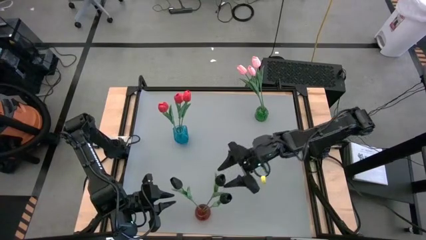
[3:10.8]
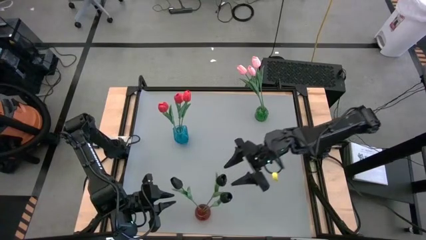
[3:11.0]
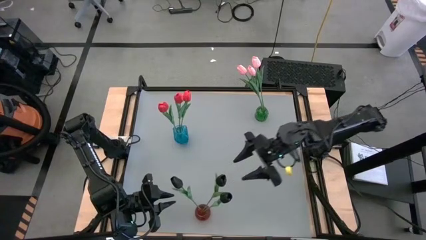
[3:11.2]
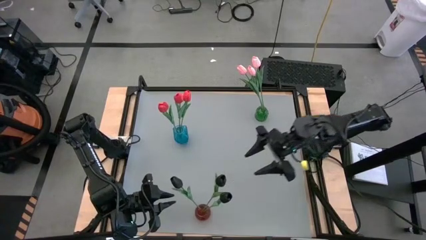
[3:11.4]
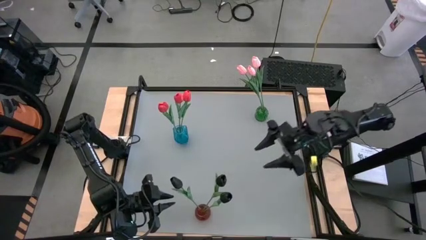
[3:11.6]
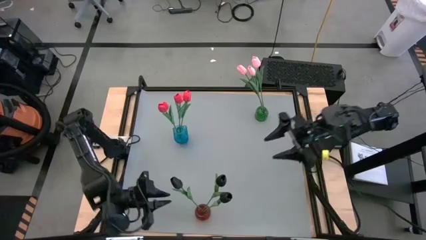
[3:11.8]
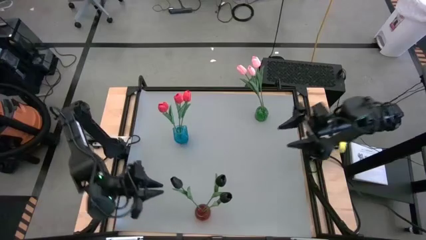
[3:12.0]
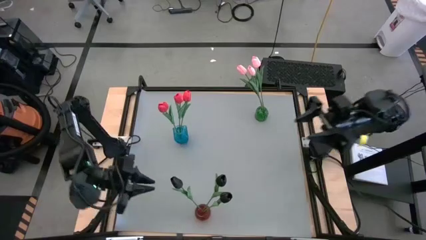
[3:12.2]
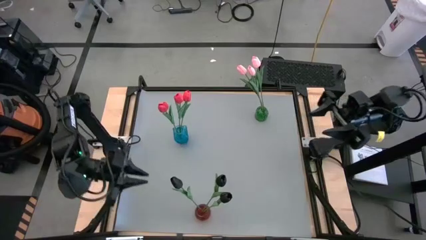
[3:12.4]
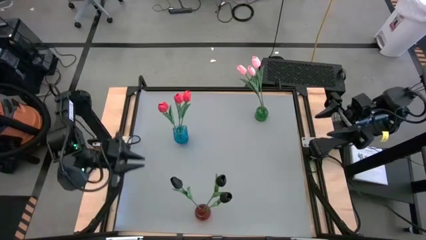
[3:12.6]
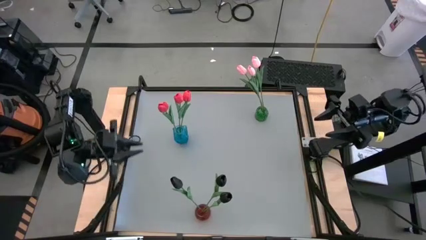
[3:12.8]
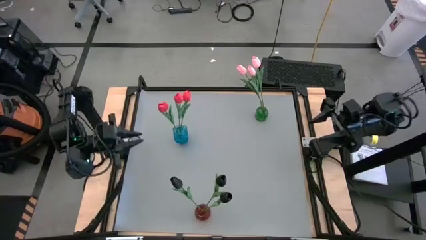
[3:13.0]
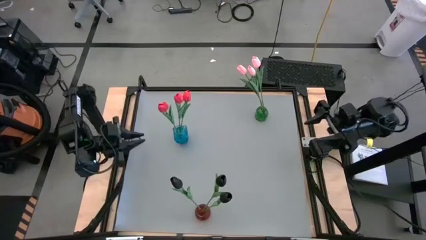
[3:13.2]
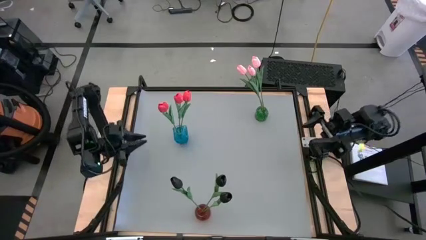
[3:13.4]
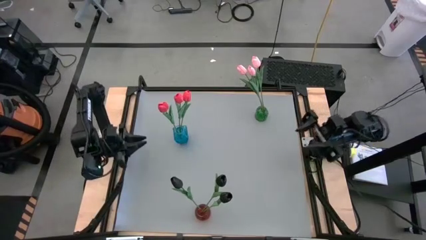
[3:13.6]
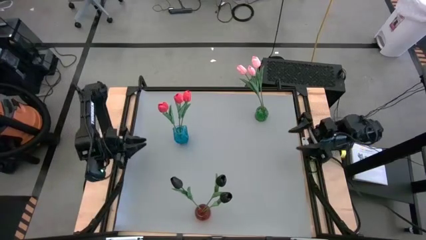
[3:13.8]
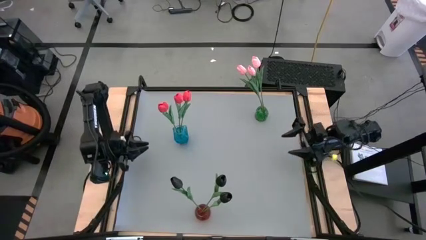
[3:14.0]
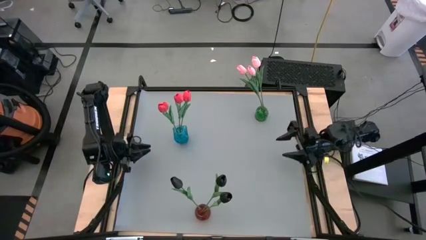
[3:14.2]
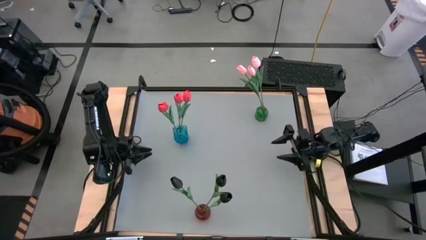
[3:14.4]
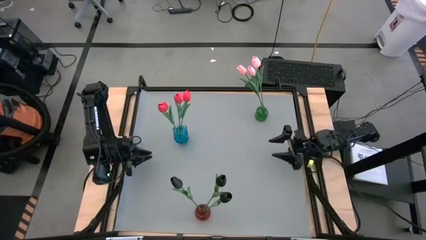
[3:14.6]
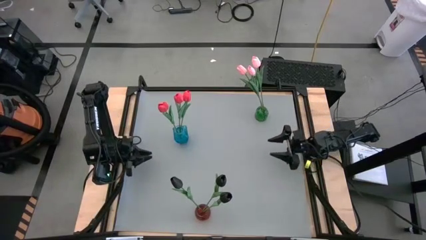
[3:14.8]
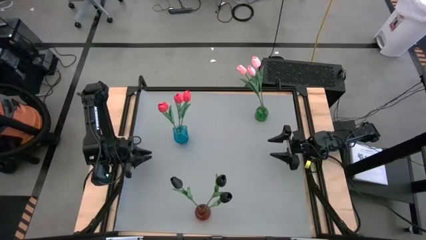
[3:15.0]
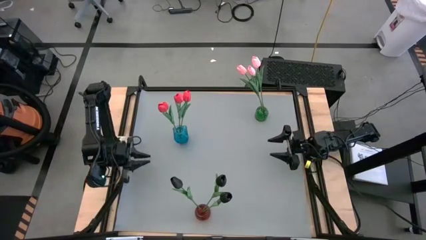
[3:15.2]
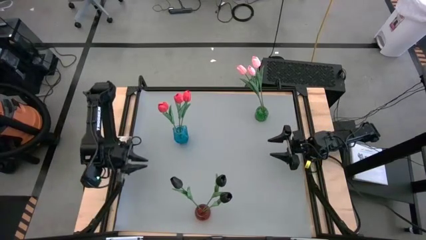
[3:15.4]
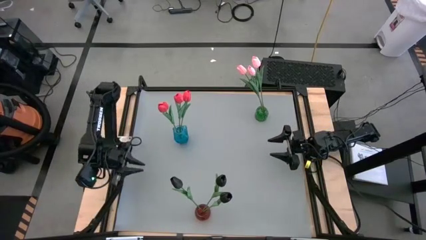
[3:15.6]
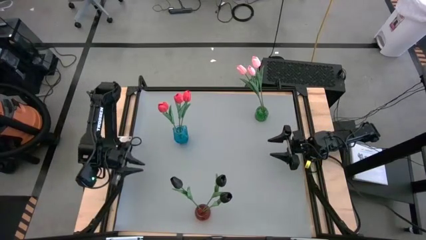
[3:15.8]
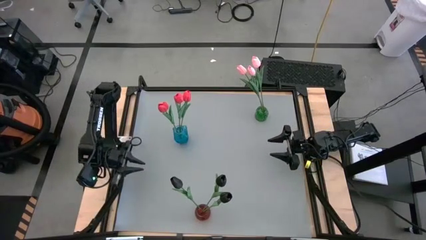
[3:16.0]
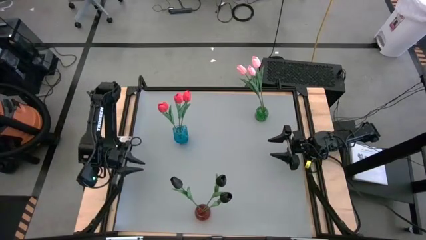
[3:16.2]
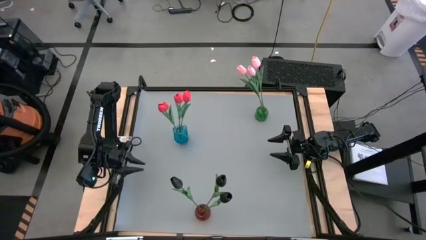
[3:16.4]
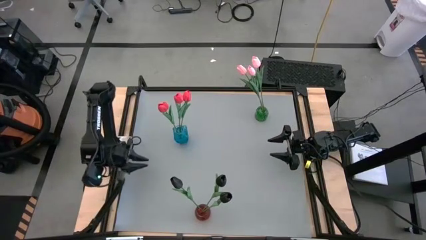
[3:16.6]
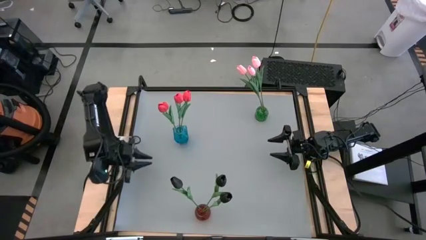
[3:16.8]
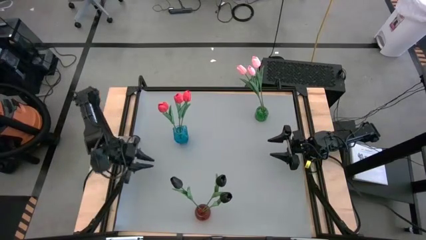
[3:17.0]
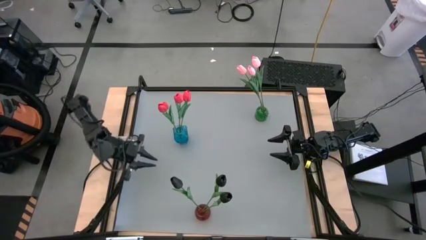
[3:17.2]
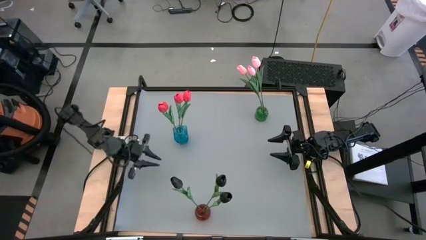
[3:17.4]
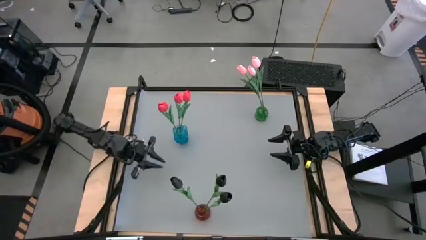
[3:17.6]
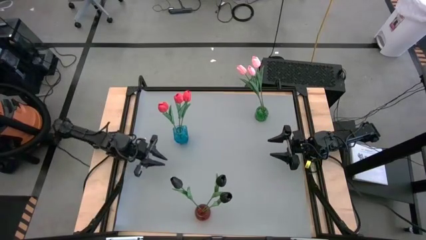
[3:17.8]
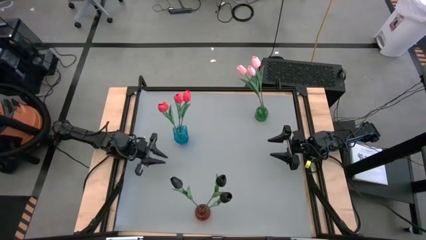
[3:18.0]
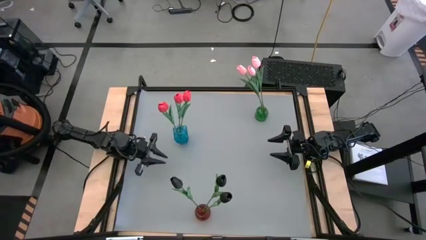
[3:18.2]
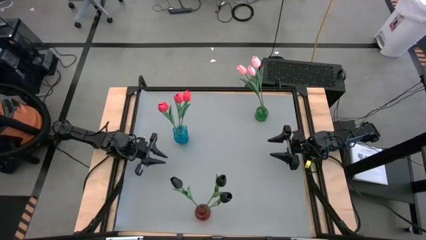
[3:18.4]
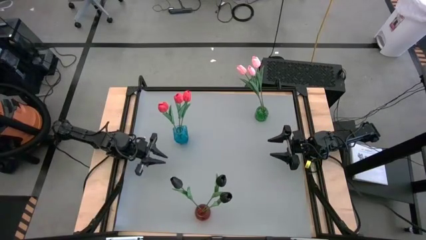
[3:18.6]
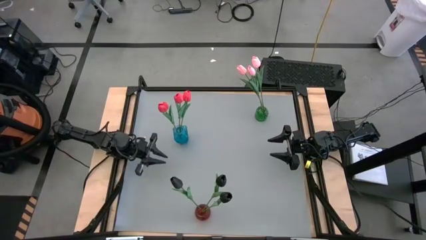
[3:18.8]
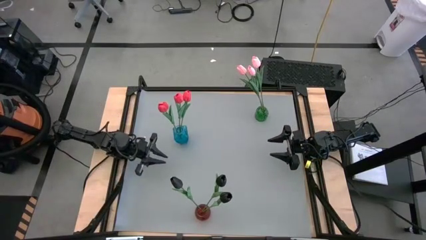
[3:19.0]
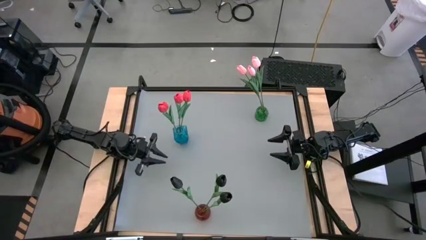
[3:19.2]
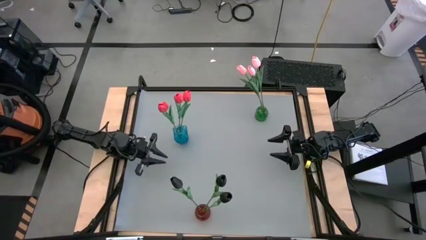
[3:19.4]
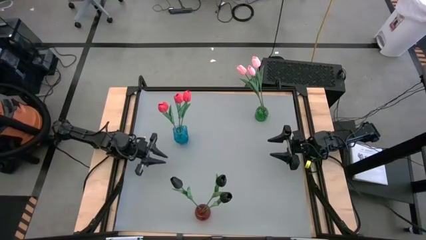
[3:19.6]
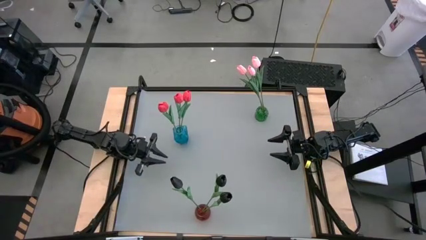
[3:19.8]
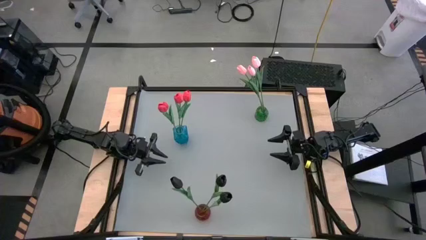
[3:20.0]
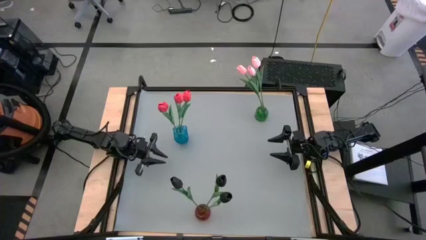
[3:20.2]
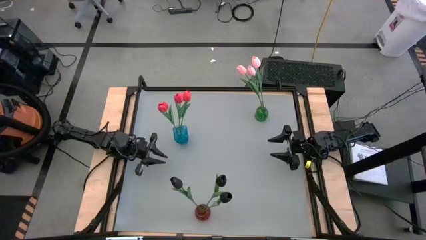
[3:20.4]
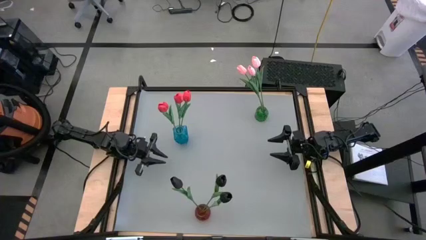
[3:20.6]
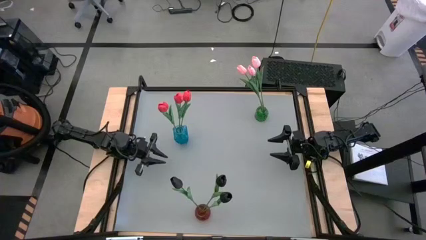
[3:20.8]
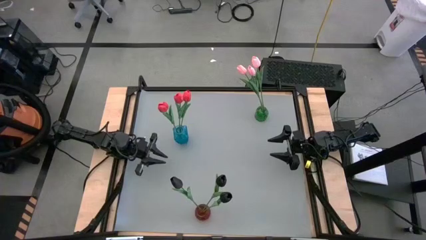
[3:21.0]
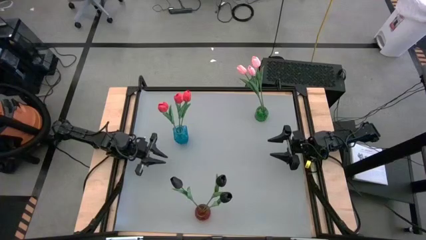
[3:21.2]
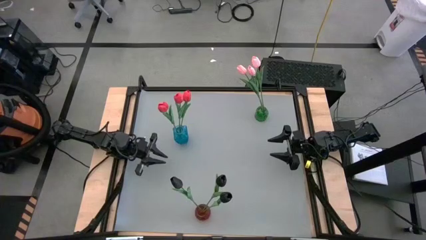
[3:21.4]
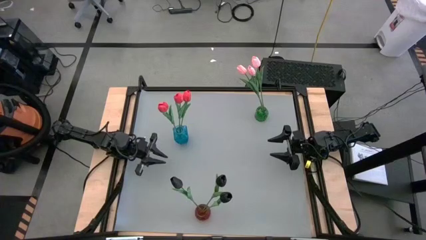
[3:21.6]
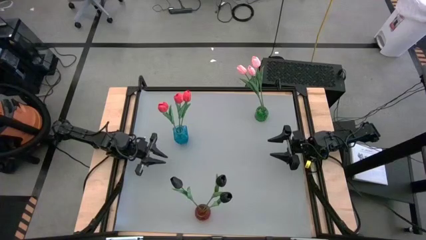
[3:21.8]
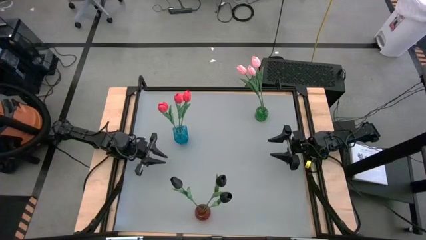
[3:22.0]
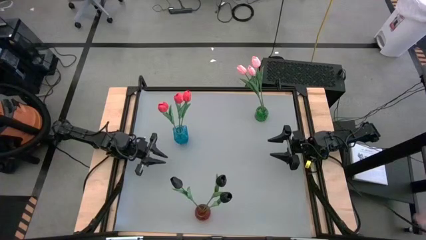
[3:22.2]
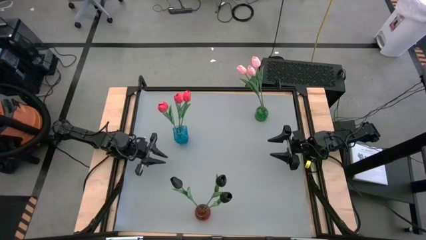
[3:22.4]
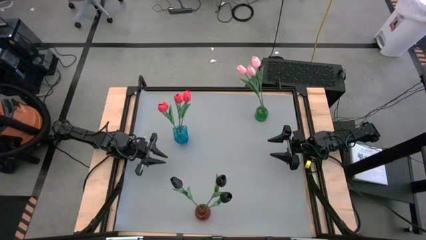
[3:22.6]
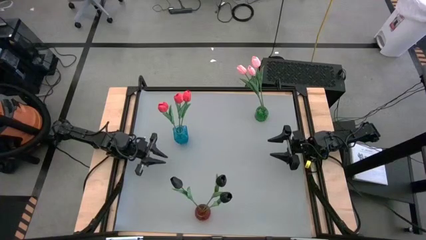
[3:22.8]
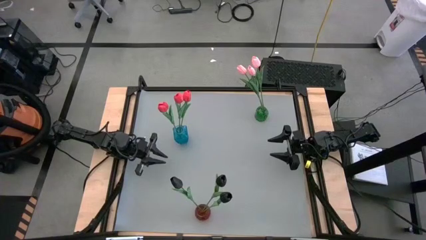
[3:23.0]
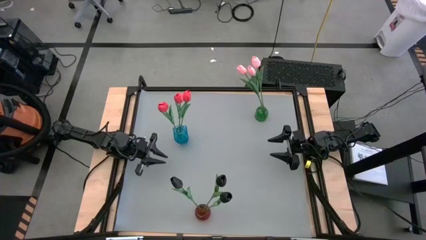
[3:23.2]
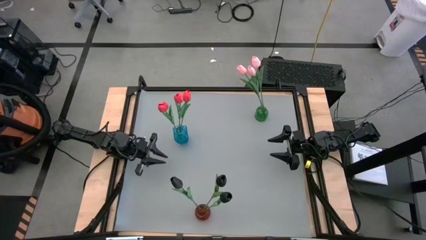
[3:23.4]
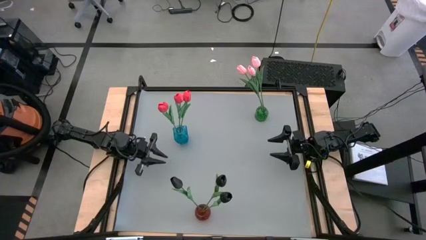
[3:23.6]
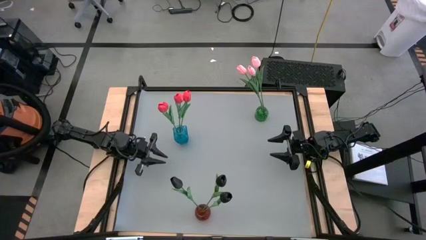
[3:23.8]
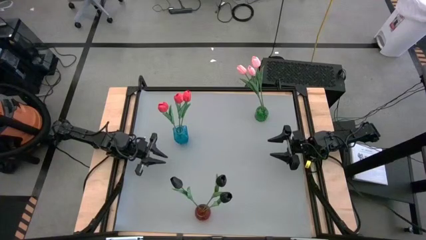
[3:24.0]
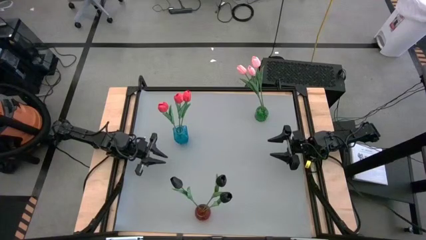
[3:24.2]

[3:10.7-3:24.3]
Task: Sort flowers into vase by color
Return to Home Position

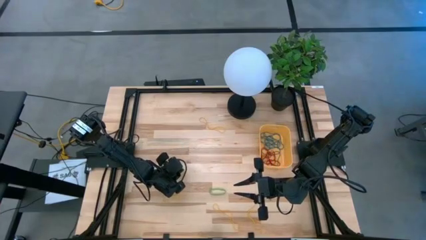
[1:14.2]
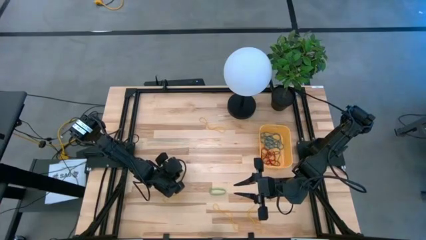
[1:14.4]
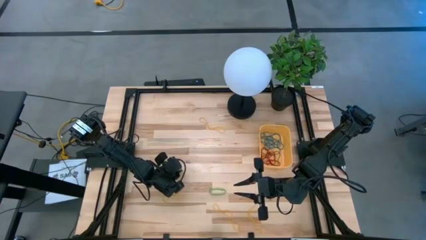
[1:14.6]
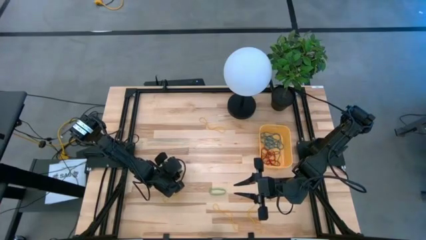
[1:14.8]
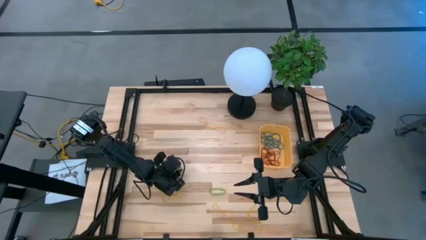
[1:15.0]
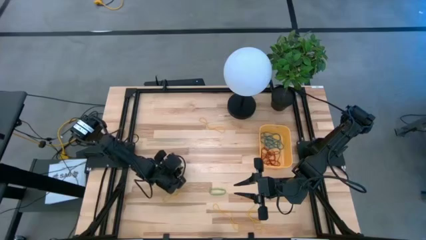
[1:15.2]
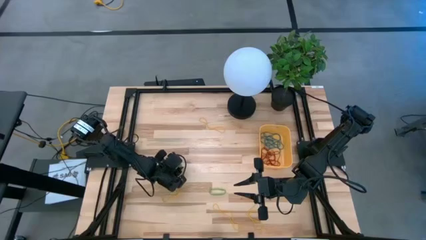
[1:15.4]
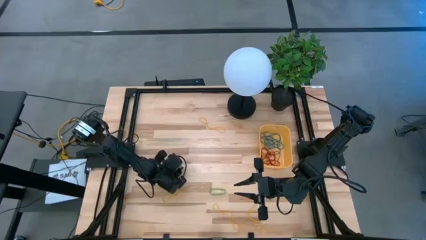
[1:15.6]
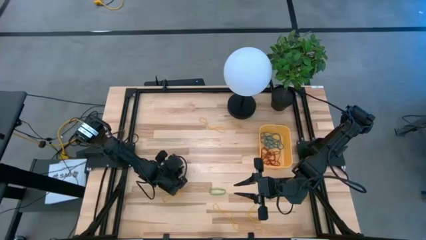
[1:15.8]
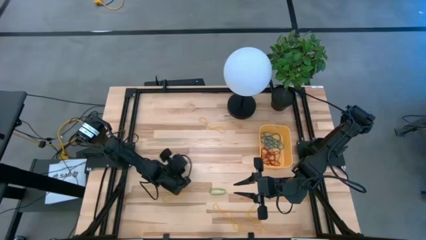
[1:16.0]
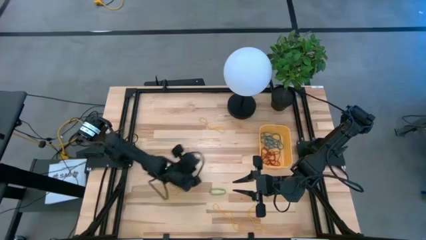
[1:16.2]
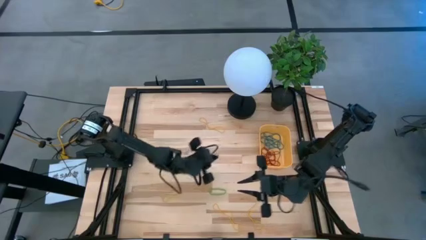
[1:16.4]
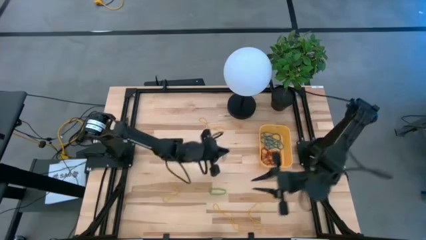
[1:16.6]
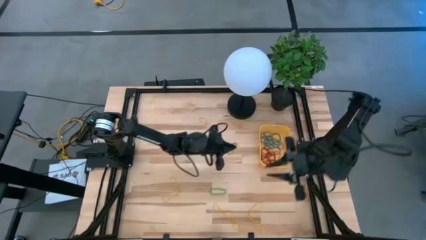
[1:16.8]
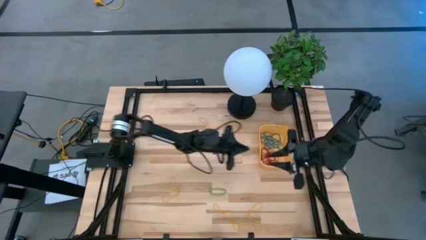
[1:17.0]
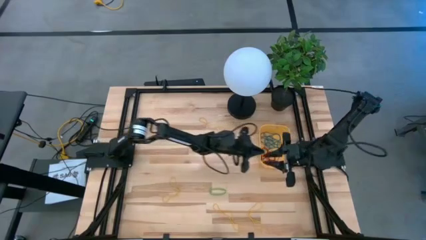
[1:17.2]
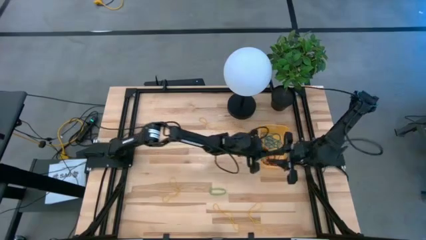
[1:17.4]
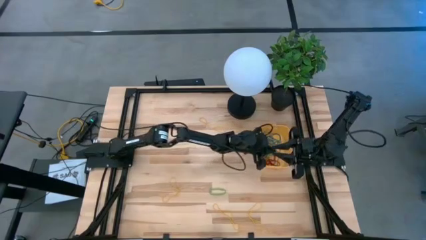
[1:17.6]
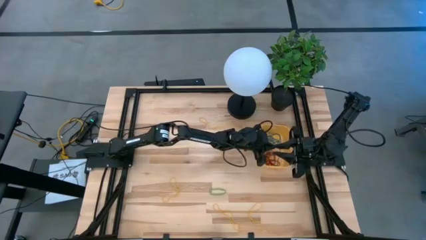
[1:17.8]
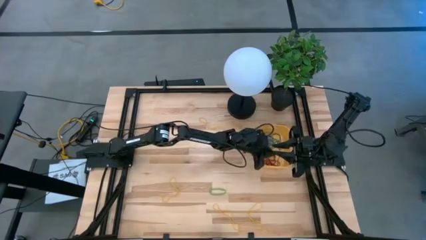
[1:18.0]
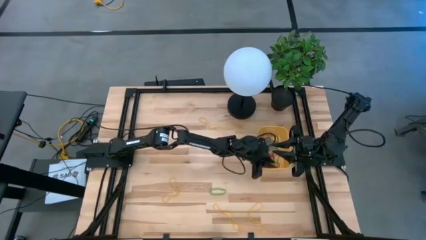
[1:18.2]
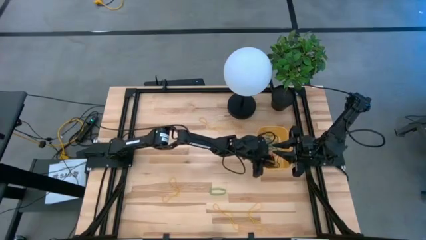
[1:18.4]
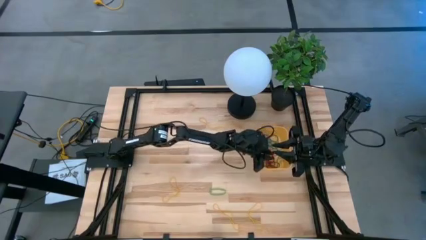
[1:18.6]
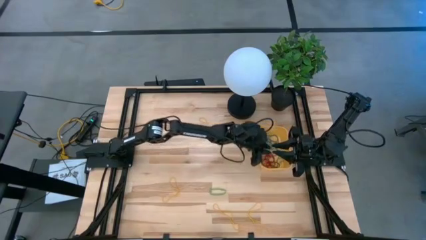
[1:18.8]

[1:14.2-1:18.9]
Task: Pick and place items into bin
Put the green rubber band into the bin
